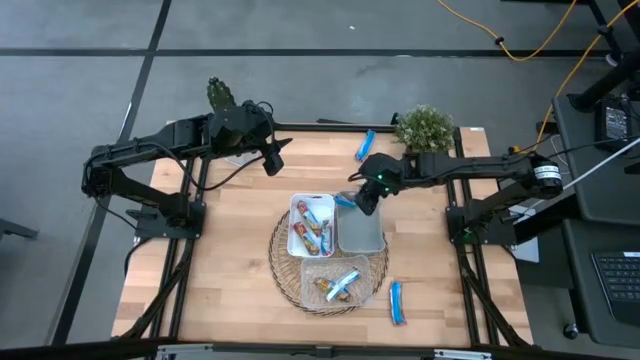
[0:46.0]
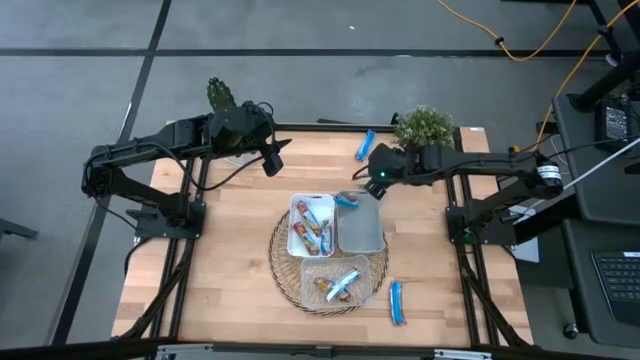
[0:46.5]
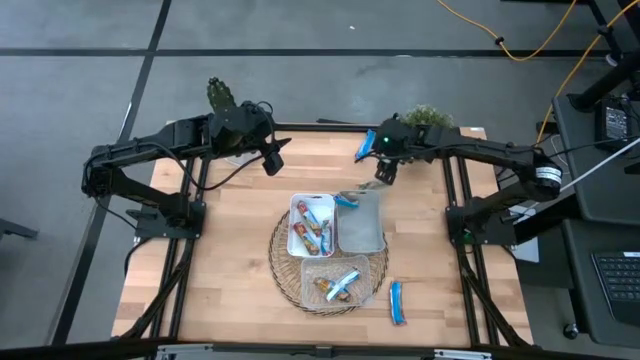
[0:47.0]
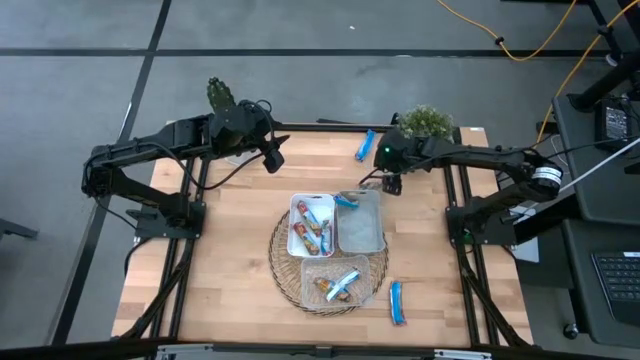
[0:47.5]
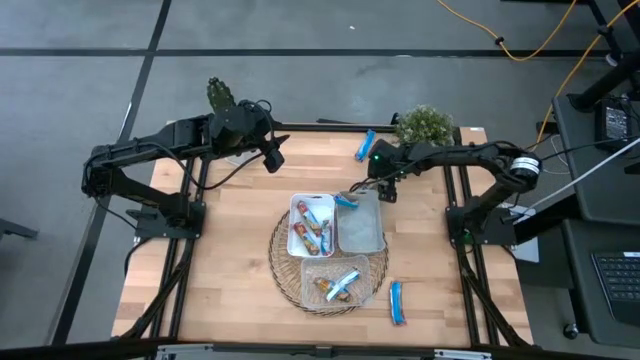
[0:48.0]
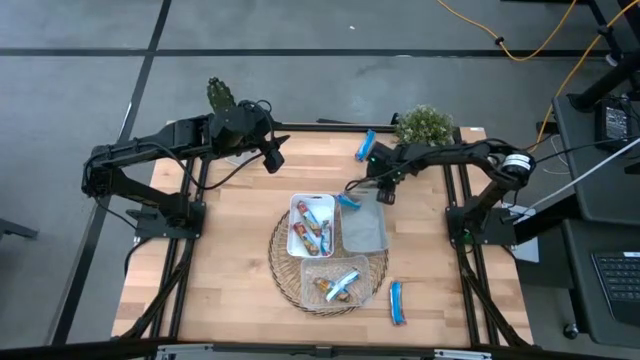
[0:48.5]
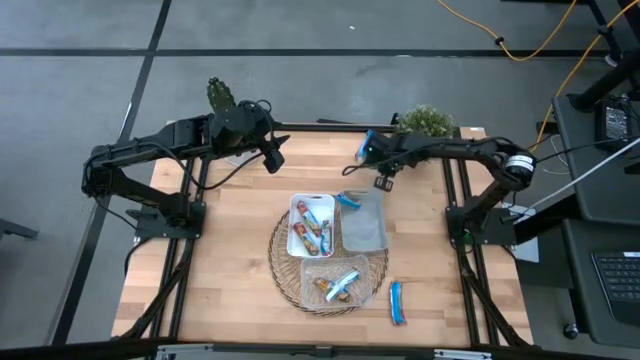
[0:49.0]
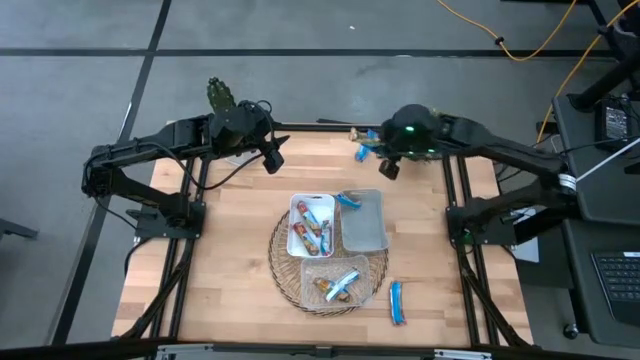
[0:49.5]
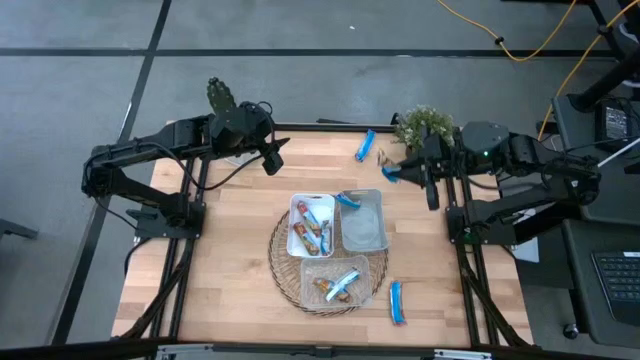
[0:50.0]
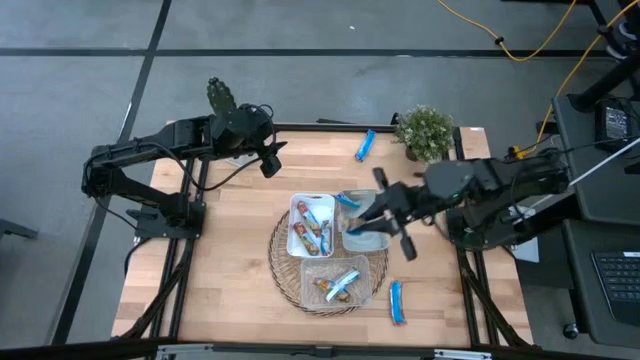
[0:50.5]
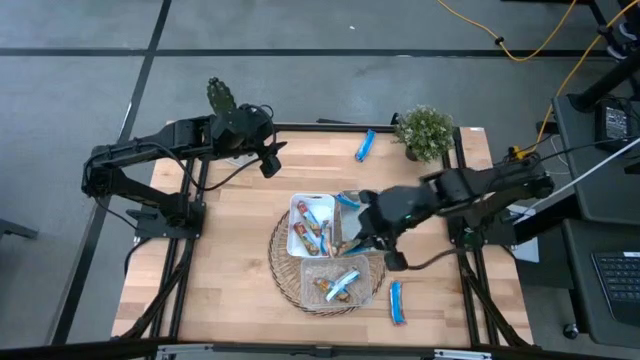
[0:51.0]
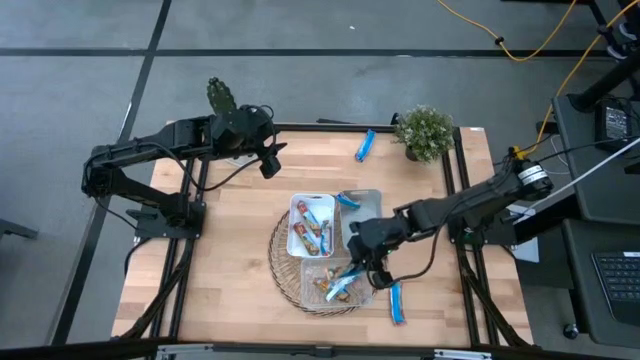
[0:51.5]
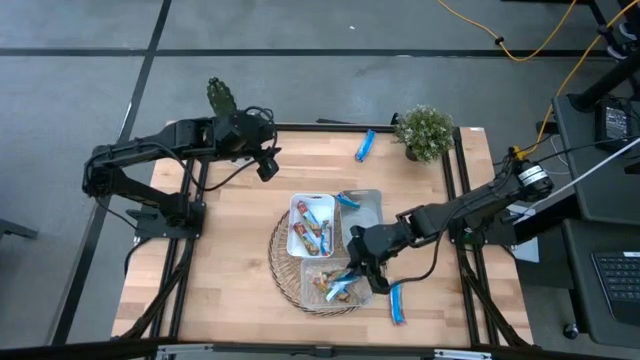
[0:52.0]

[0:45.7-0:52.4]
Task: Pick and place Granola Bars by type
Put the orange granola bar into the transparent bin

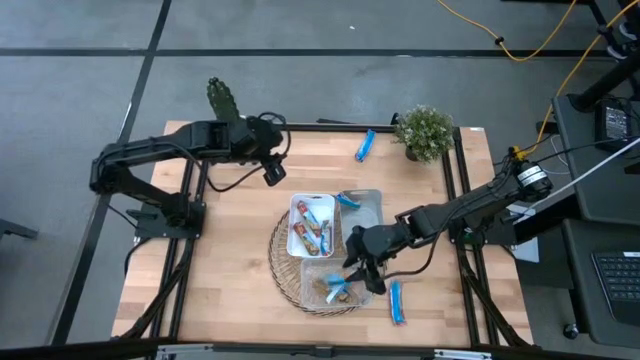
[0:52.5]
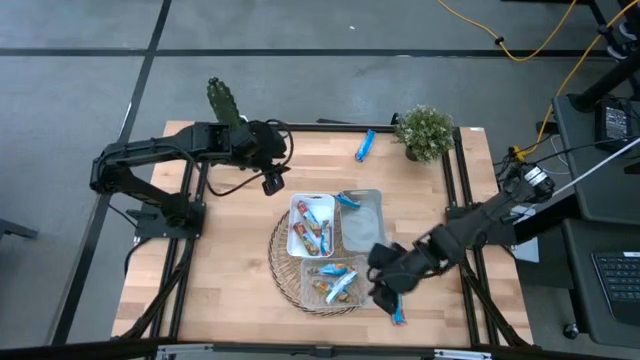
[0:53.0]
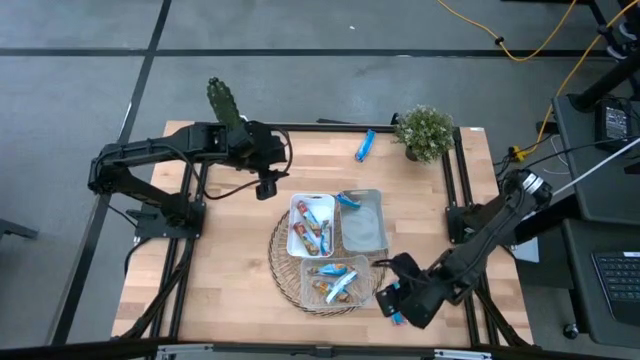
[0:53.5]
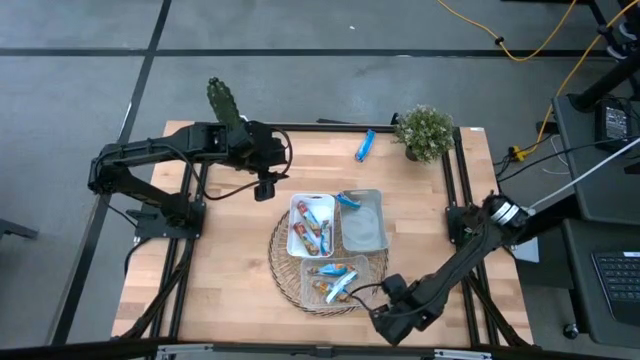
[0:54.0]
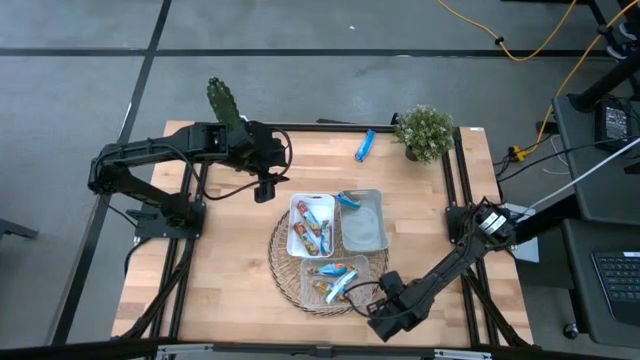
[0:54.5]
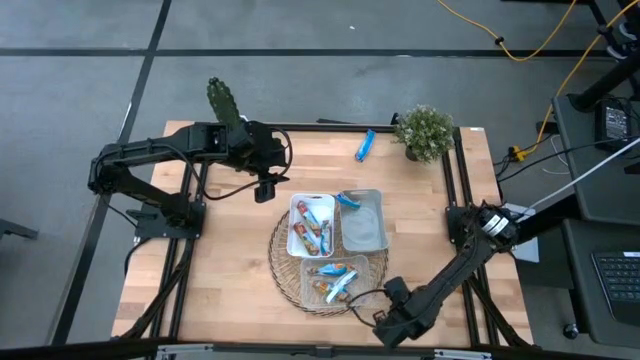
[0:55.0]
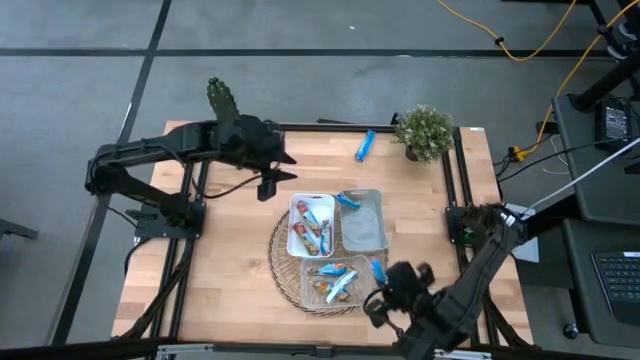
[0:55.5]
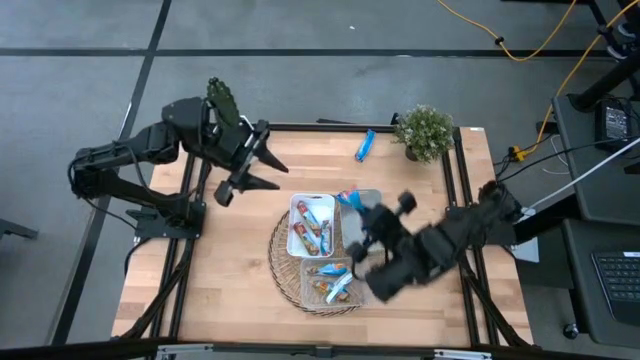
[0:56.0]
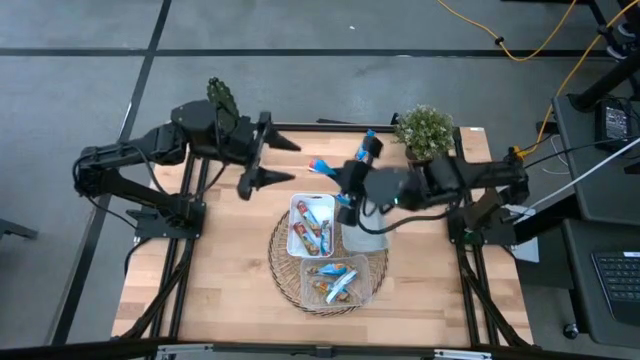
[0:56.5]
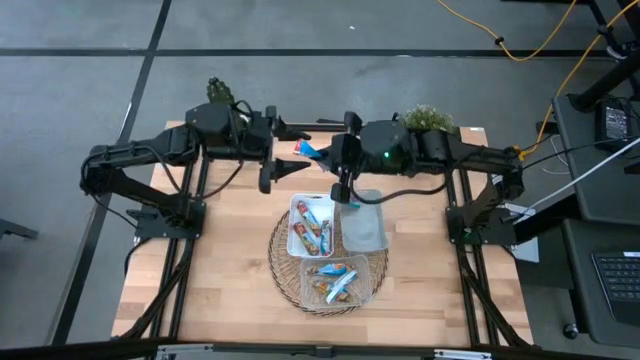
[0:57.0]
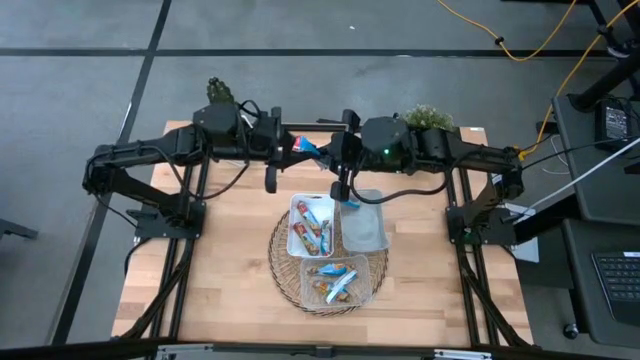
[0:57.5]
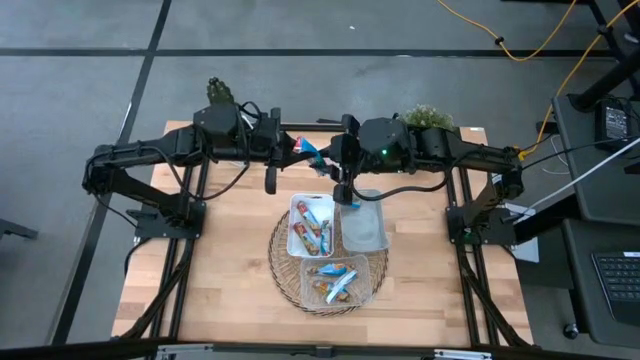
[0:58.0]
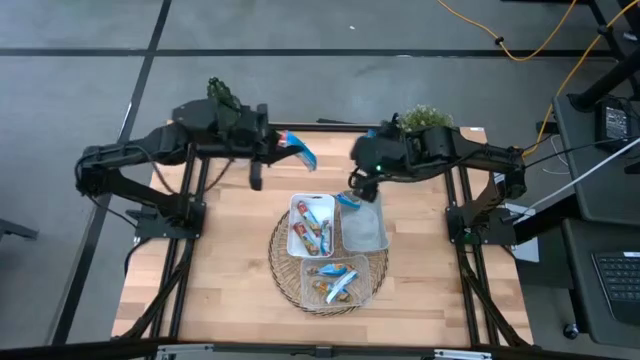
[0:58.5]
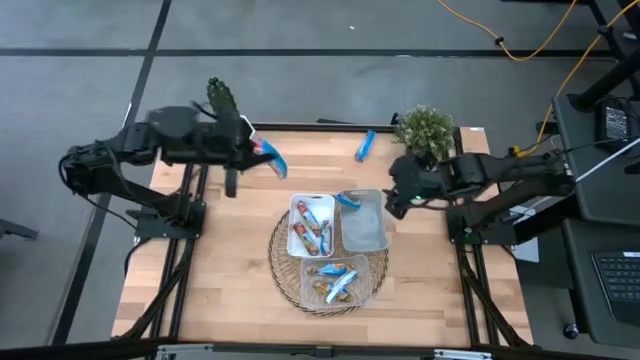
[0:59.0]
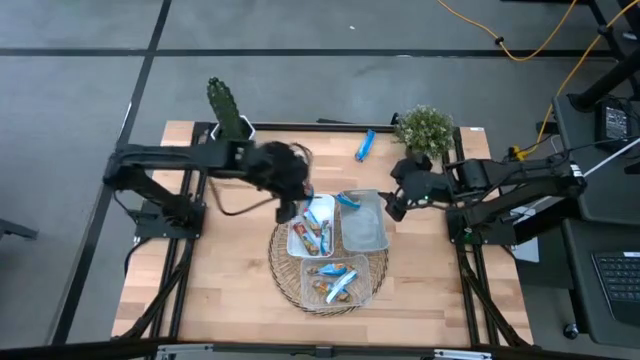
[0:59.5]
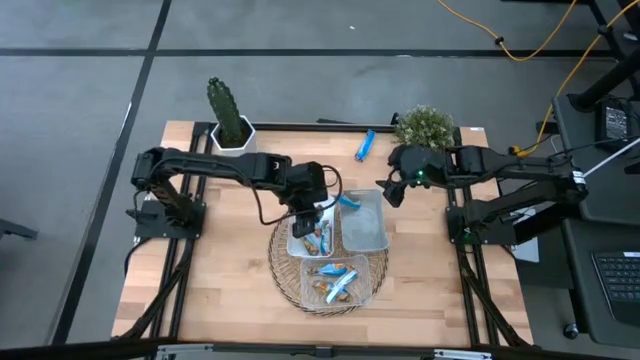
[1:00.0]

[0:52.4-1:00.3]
Put the red granola bar into the white bin

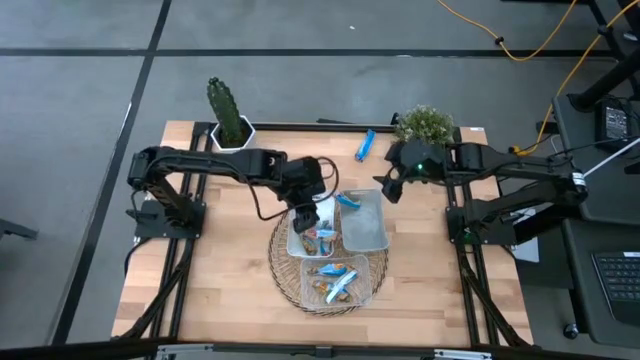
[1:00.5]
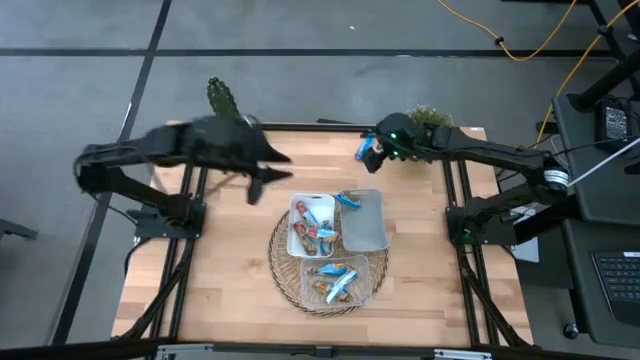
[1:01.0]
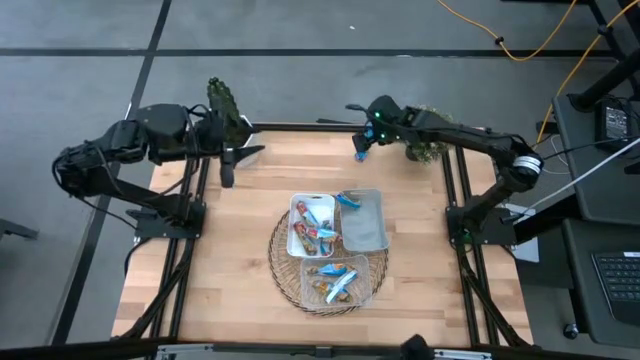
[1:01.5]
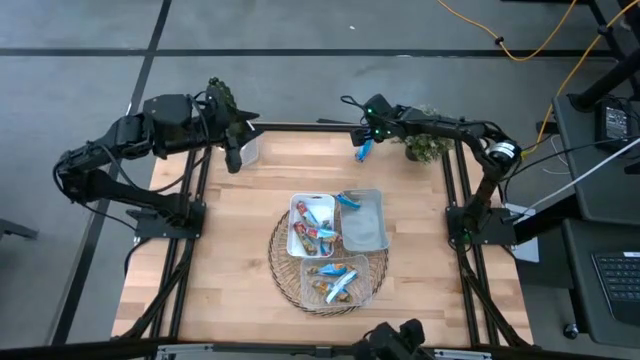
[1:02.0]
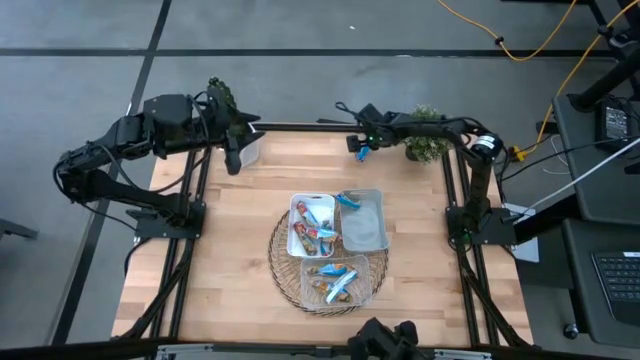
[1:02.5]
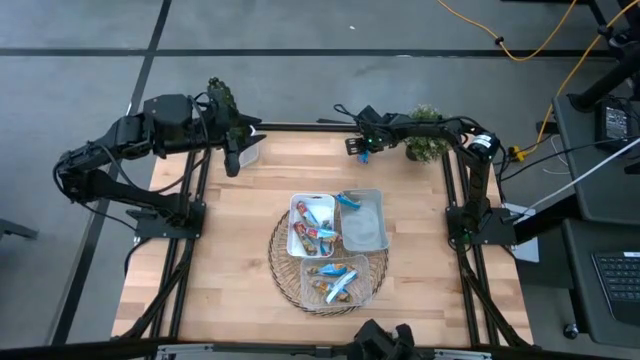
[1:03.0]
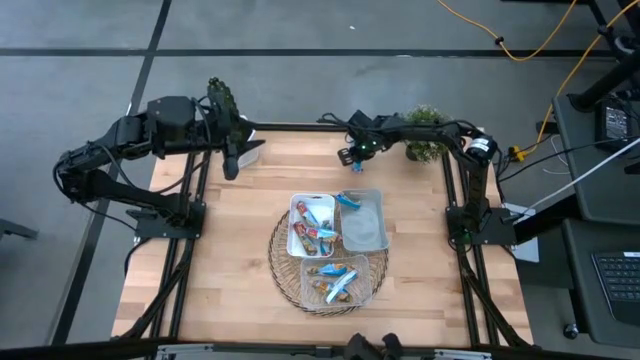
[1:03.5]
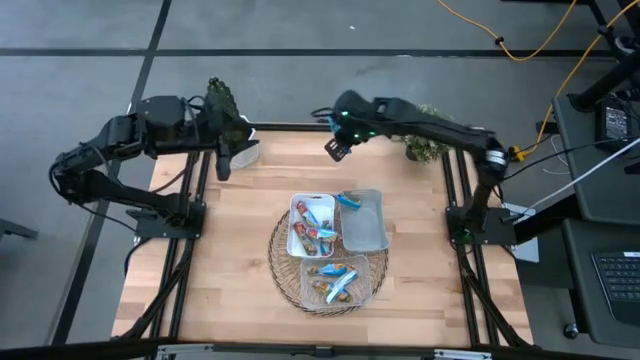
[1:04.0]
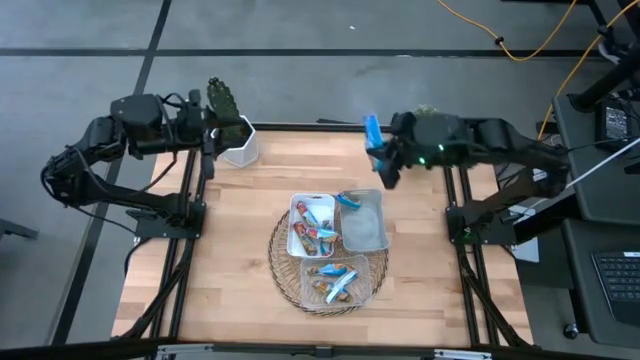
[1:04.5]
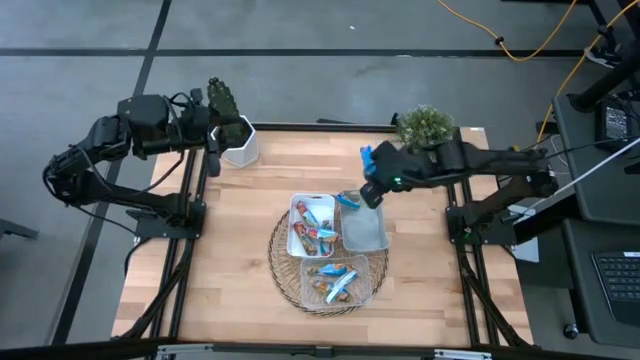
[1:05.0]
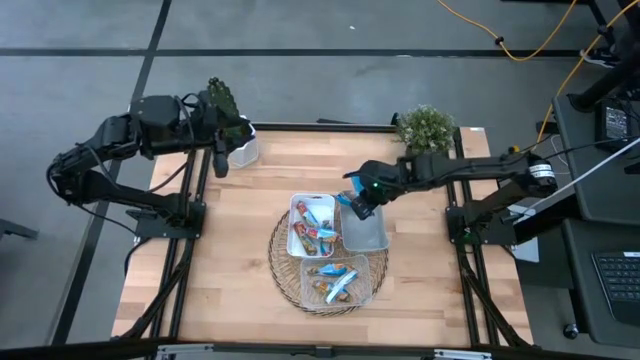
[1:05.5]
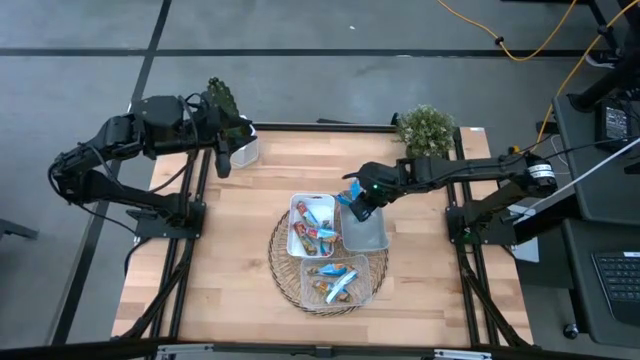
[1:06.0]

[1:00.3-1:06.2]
Put the blue granola bar into the gray bin

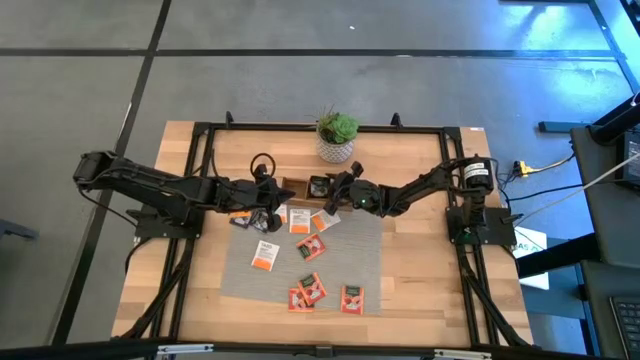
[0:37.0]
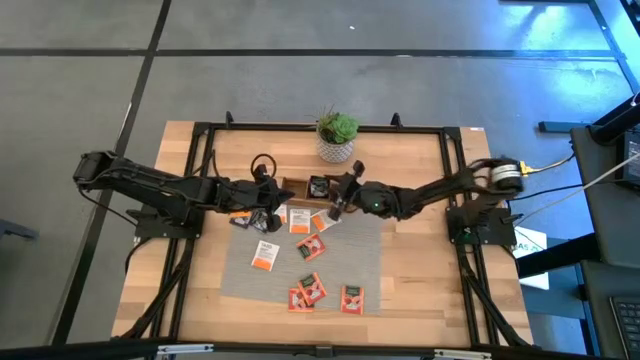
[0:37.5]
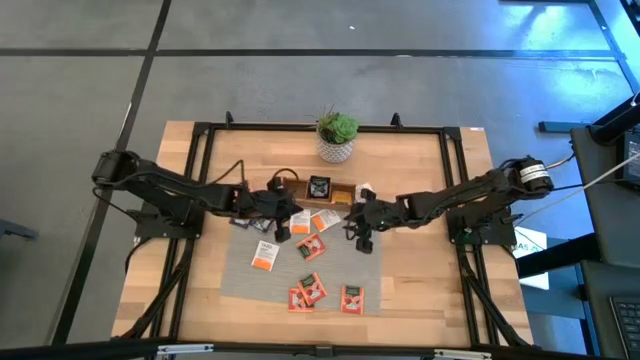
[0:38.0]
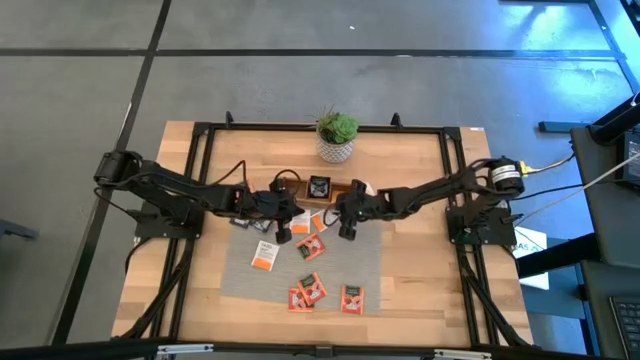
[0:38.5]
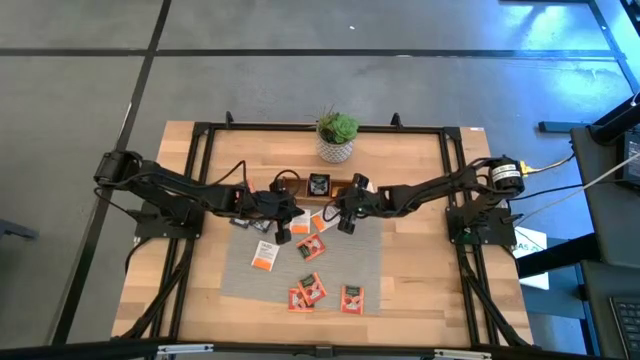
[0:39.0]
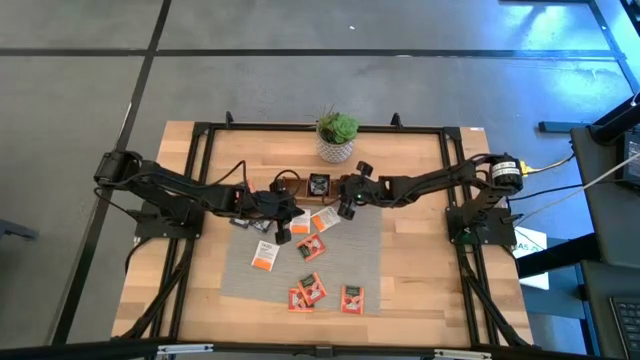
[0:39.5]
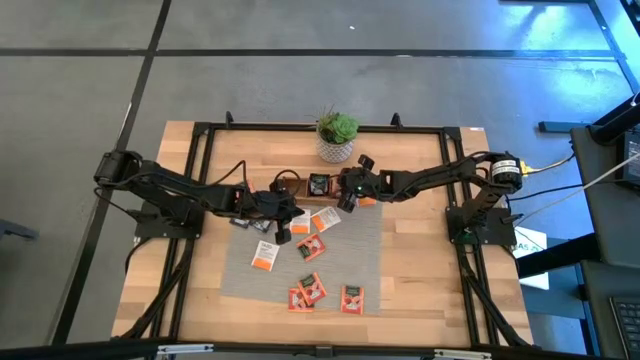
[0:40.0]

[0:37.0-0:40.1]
Task: Pick & Place Tea
Adjust the orange tea bag
